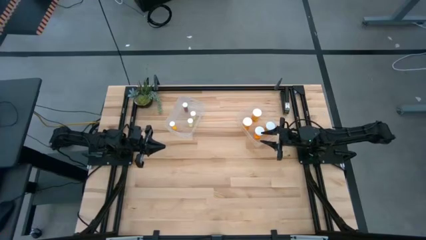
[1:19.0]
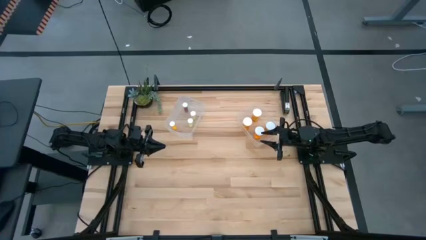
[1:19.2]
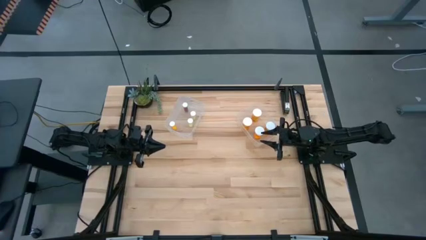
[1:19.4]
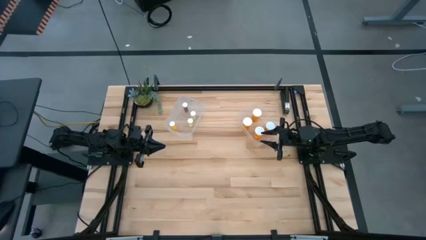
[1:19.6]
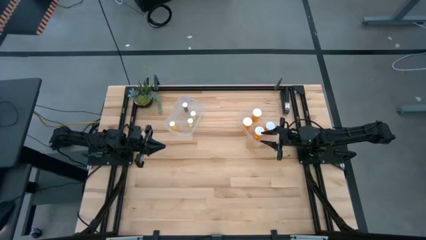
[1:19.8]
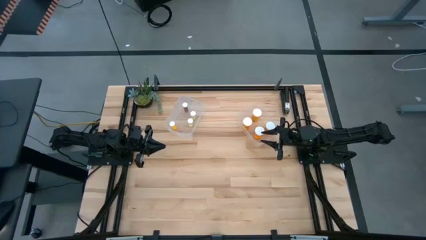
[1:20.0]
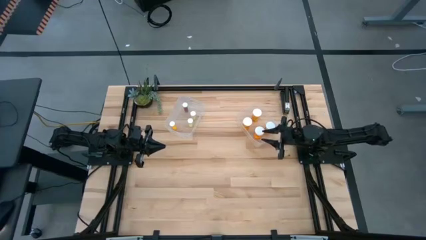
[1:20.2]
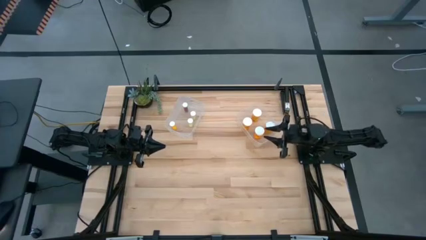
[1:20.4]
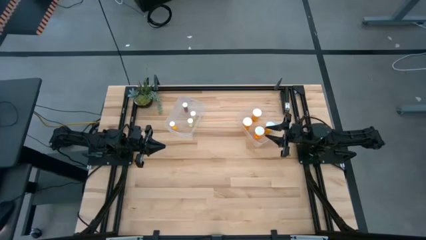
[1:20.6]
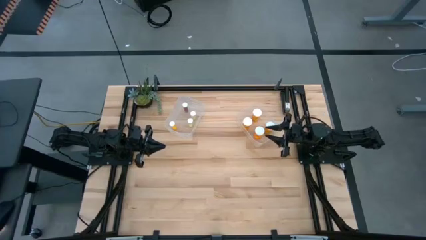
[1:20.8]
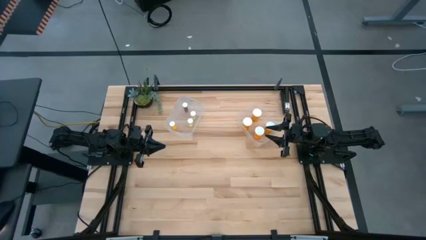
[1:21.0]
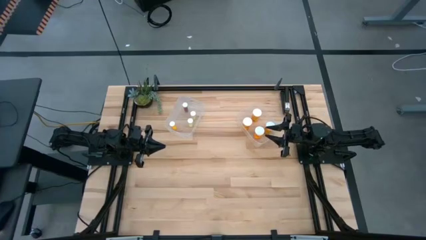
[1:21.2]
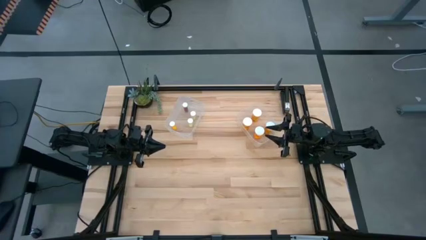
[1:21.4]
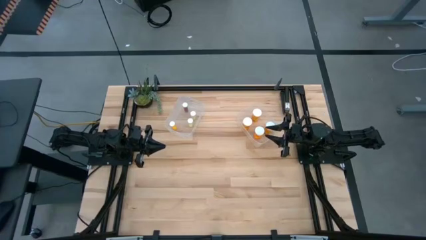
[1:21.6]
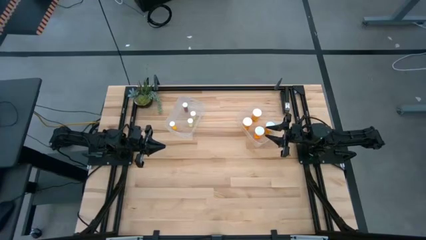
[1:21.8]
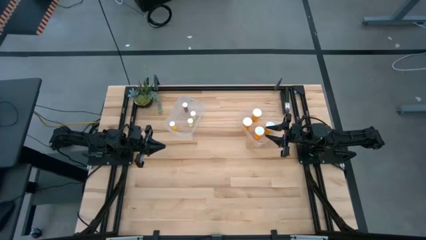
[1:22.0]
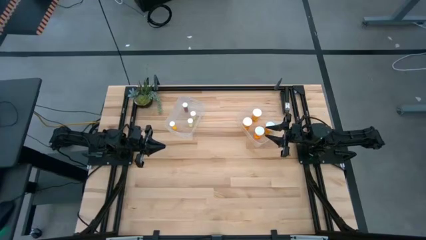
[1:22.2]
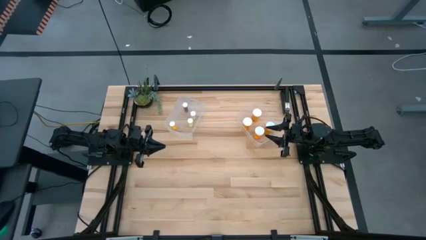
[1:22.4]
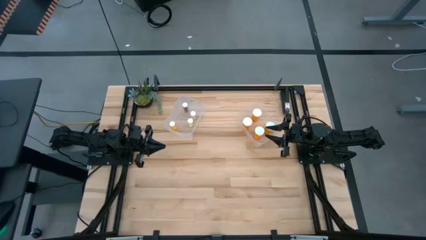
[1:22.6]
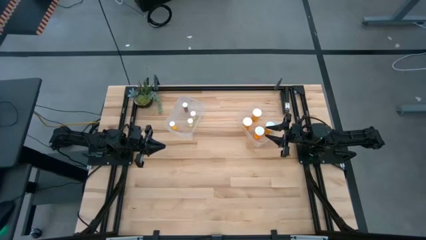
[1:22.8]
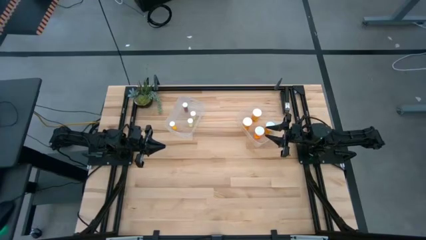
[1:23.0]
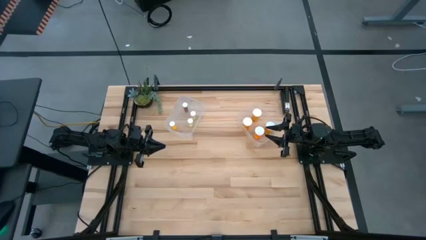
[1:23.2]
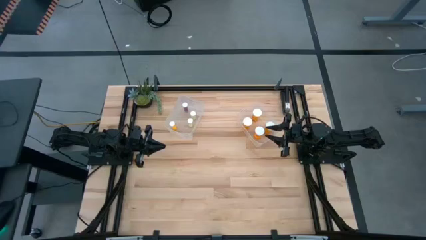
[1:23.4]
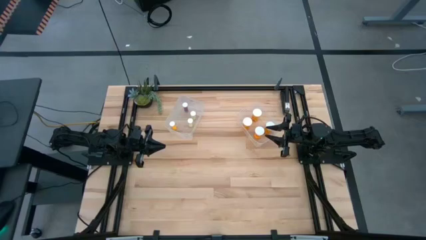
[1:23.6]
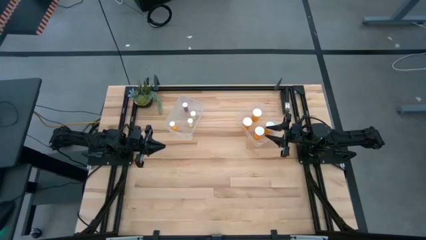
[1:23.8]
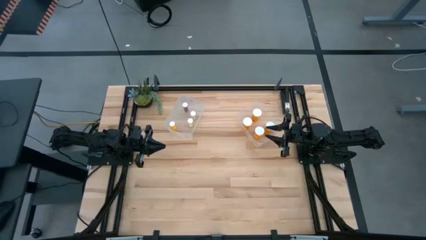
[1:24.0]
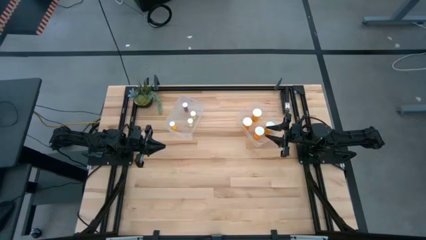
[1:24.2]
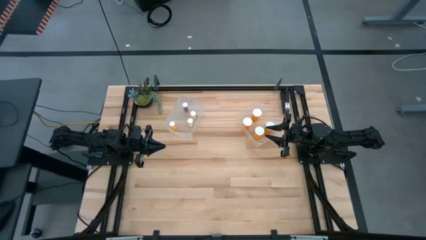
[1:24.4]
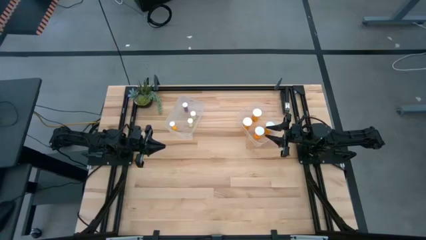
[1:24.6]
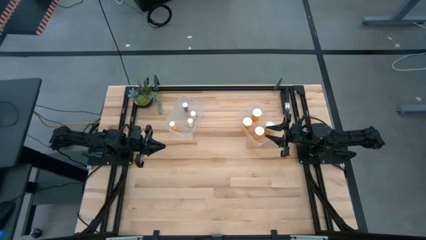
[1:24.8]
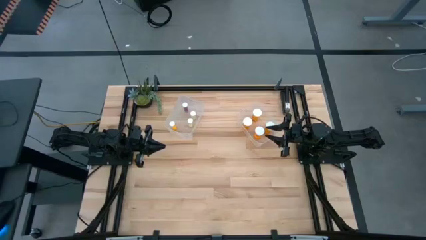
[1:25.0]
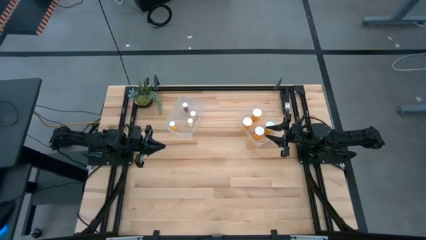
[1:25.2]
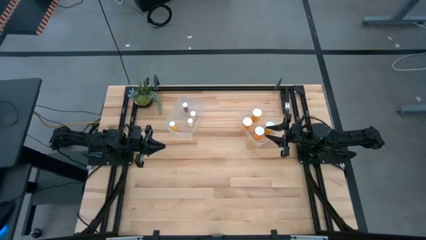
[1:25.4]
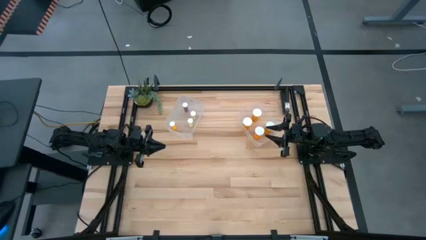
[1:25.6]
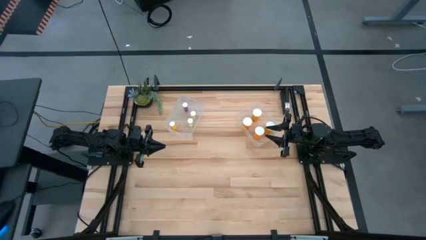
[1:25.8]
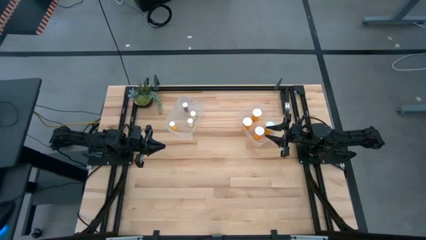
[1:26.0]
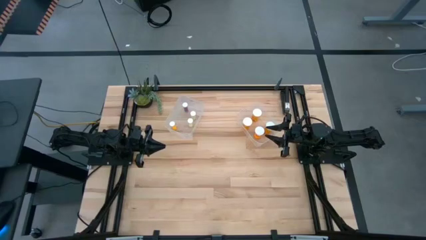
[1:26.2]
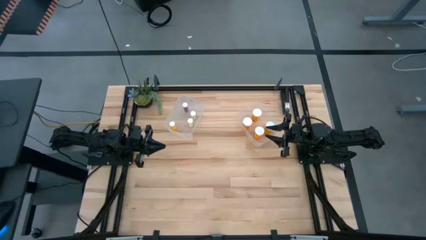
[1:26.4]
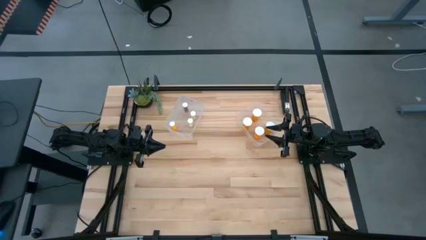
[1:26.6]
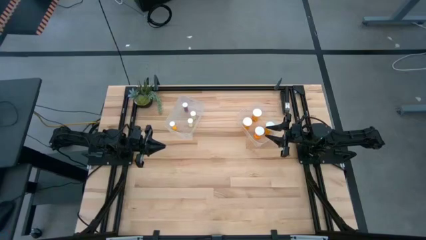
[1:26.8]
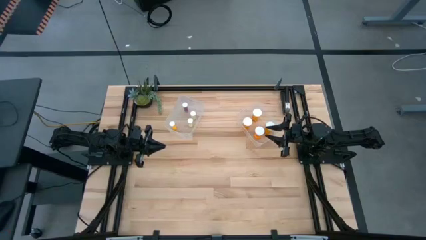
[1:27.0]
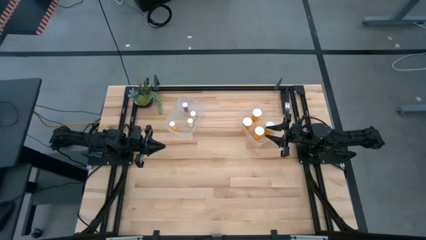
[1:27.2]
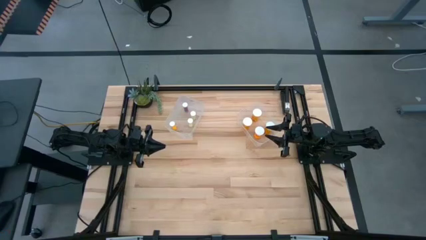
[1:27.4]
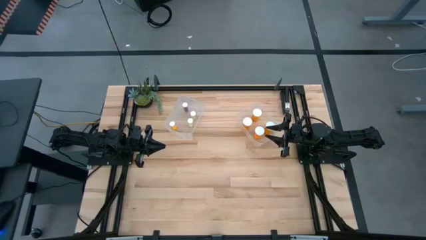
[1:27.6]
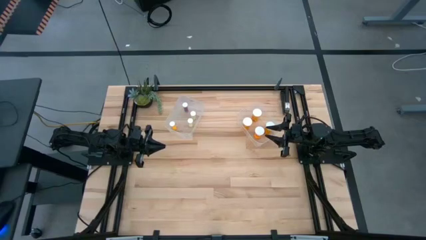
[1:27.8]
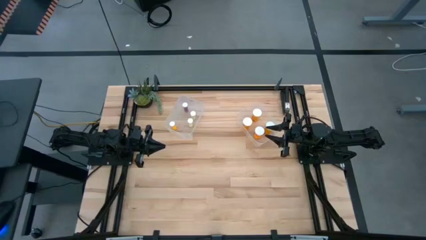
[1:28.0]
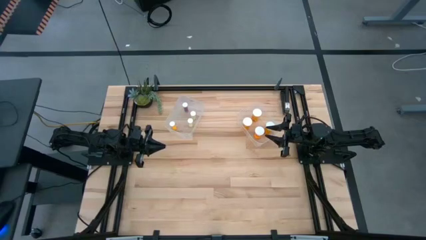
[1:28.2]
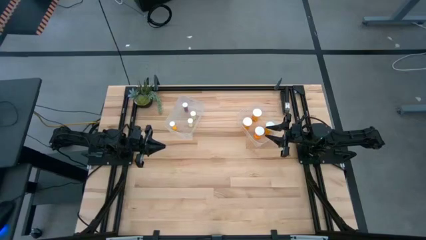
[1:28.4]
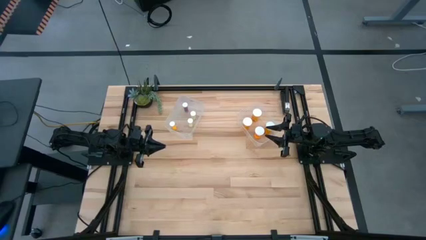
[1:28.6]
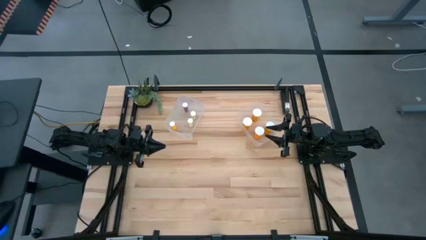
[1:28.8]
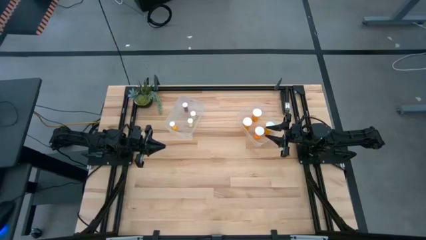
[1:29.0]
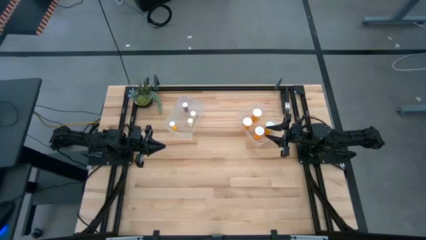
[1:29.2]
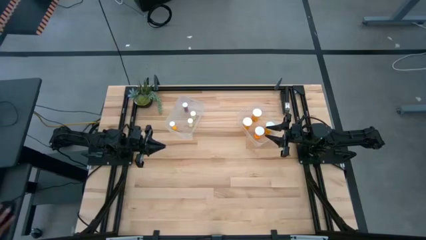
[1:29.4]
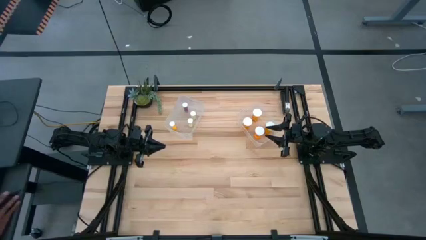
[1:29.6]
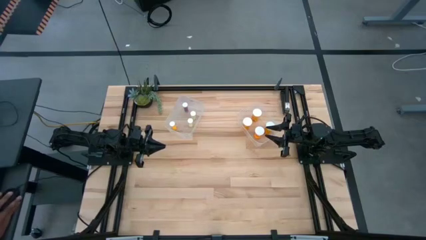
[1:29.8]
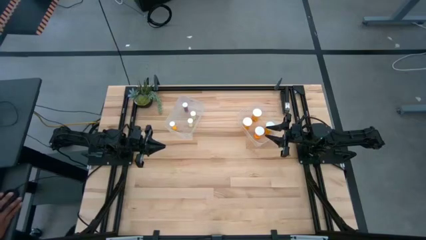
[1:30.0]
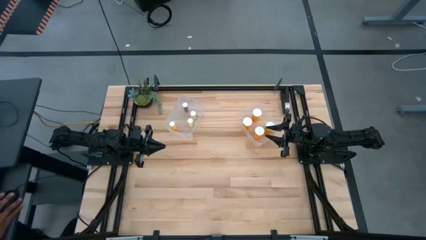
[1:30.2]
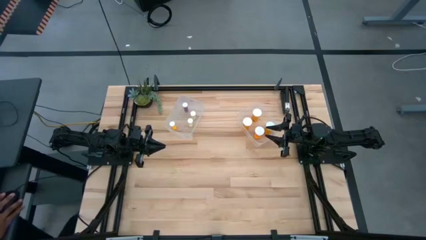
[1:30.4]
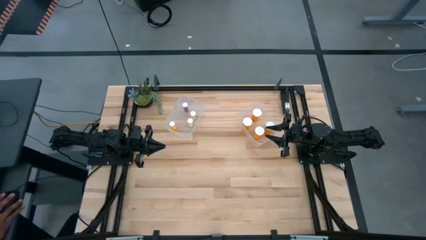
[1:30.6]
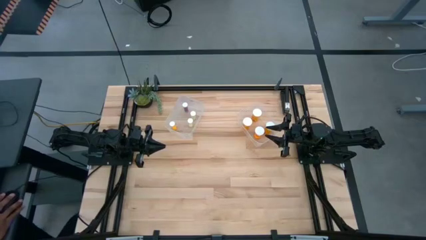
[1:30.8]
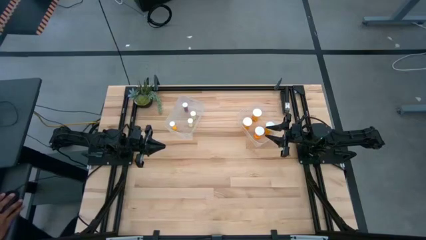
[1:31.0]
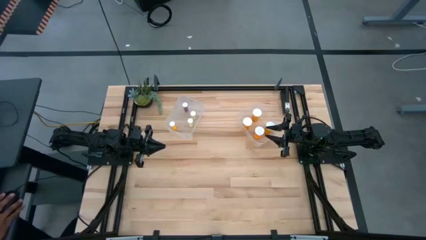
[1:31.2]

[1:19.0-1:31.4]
Task: Pick and place medicine bottles into bin by pill shape (circle, oval)
Return to Home Position

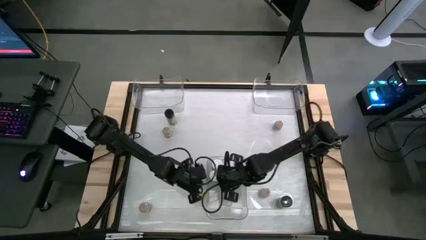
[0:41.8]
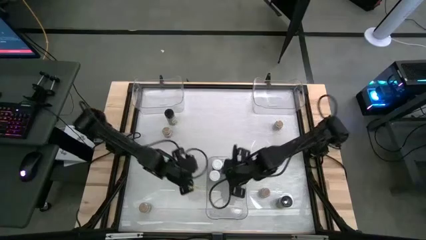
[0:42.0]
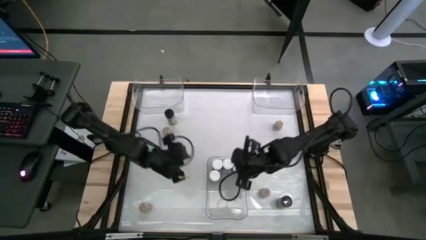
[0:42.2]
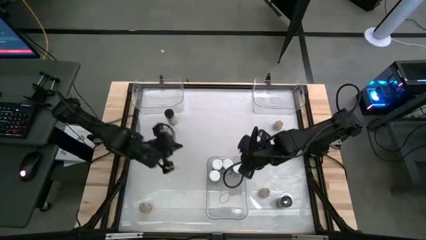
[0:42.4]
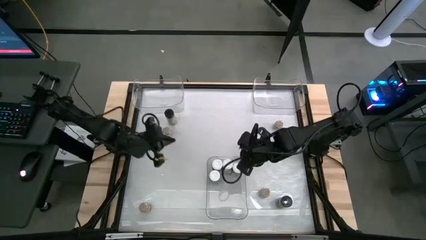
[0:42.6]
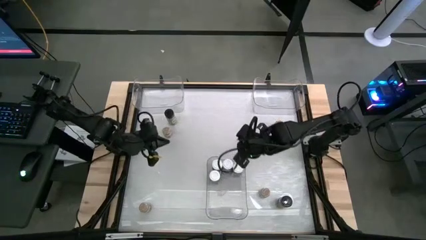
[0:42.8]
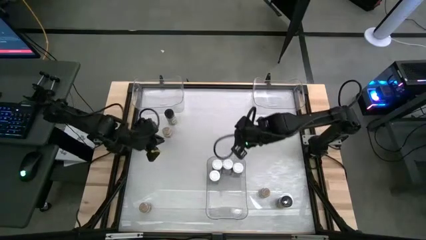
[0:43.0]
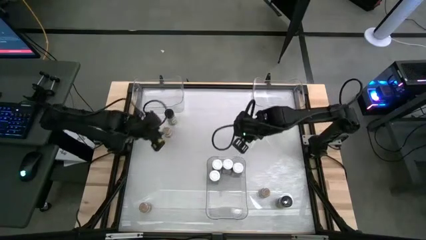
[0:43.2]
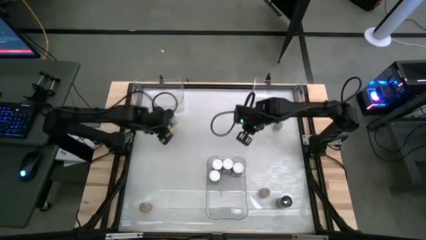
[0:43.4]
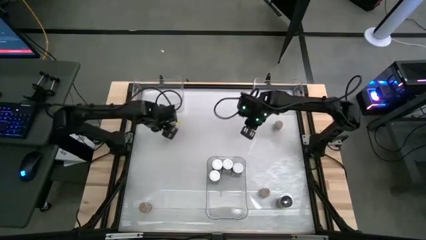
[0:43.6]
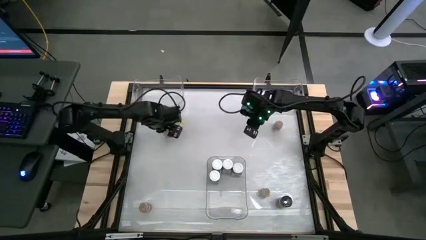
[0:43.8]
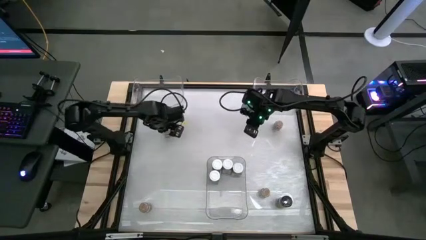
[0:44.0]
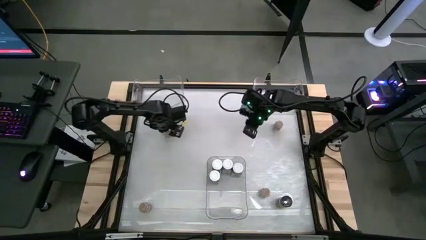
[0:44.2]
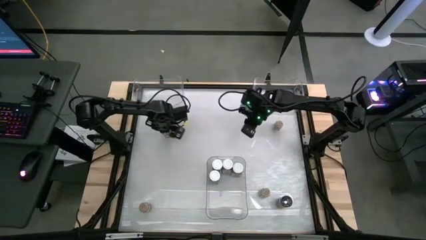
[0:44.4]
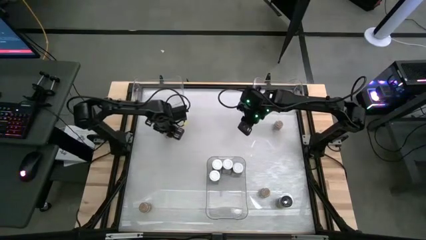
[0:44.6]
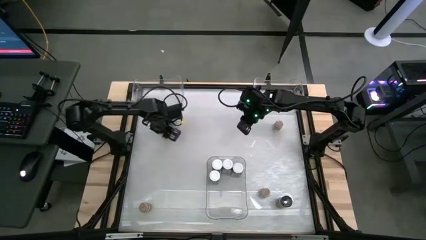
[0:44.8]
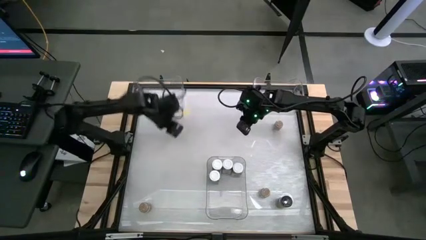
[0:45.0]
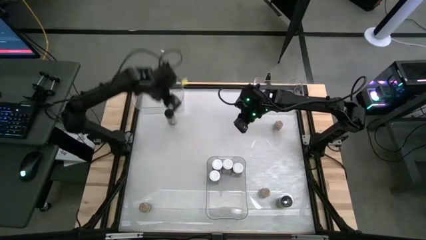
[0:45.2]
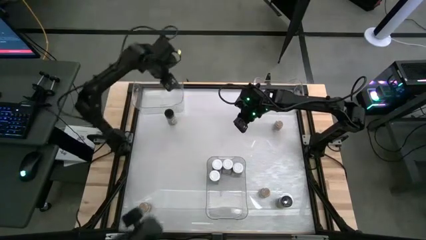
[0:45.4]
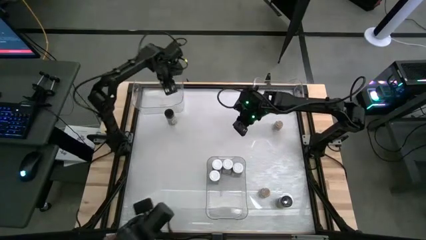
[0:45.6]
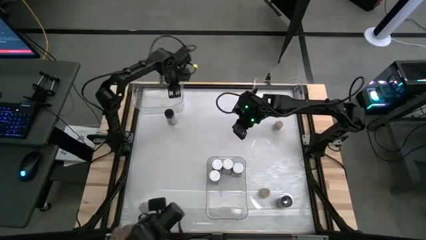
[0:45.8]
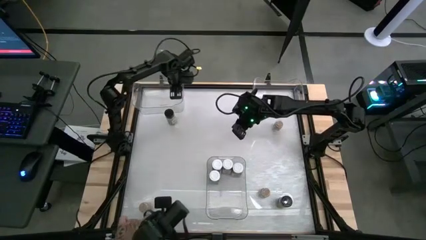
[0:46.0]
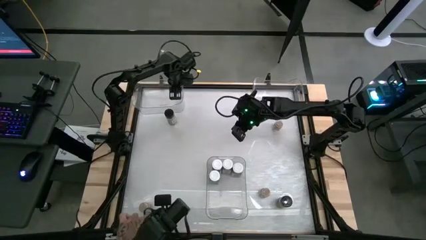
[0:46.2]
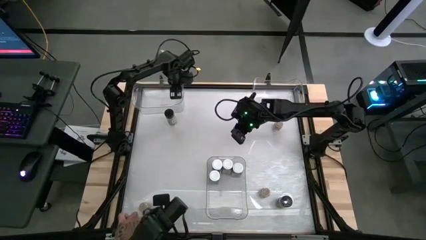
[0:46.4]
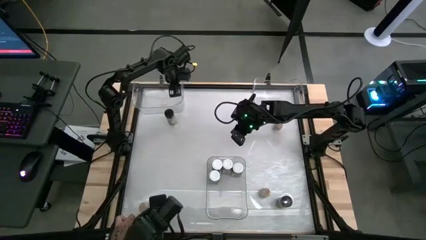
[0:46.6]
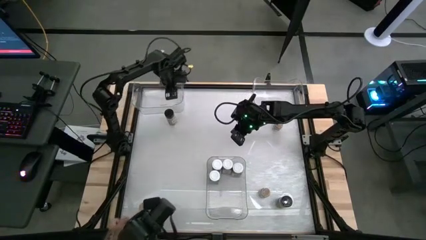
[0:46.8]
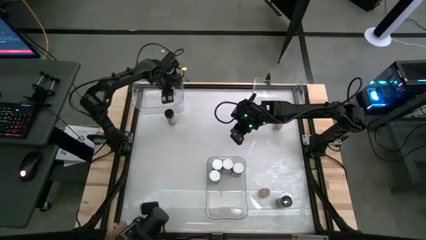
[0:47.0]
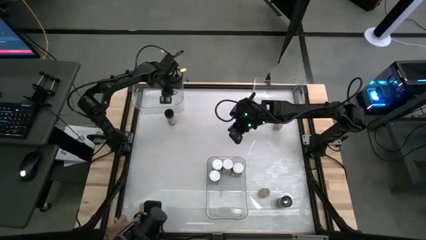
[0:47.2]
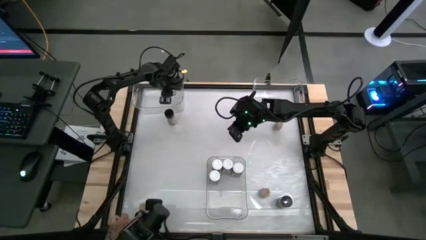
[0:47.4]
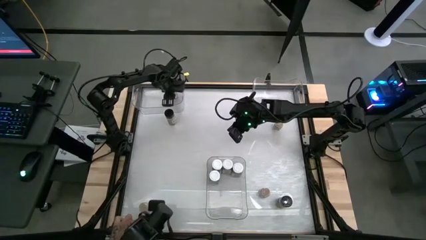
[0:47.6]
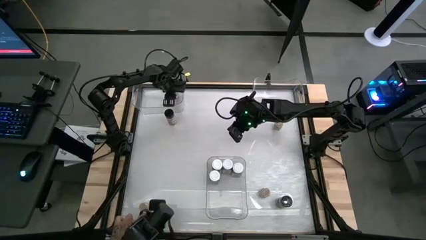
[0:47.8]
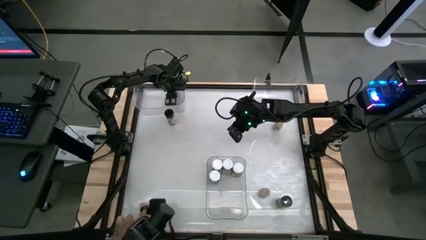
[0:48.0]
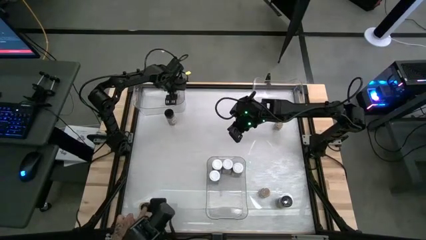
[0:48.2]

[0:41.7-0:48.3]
Task: Sort spices by type
Put the top left brown seasoning bottle into the top left transparent bin
